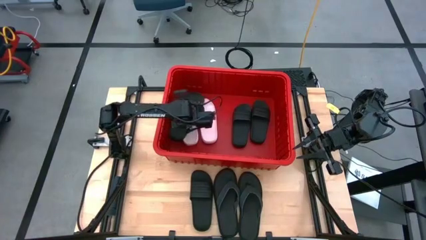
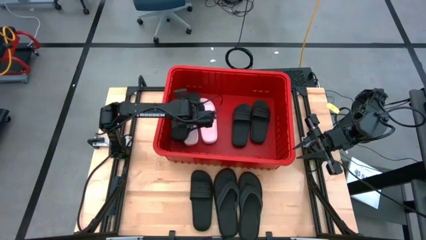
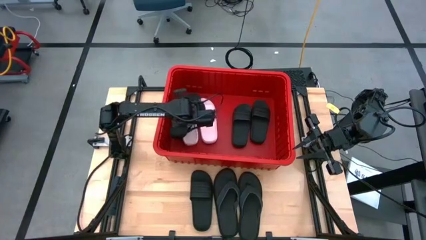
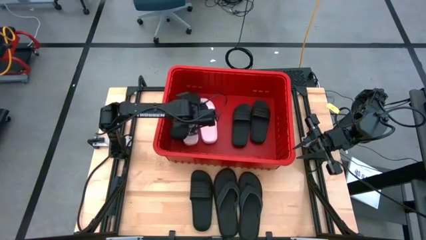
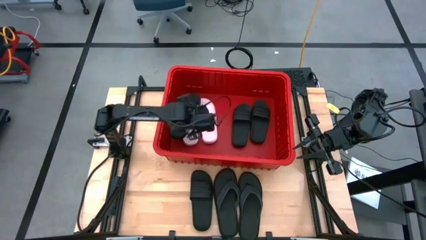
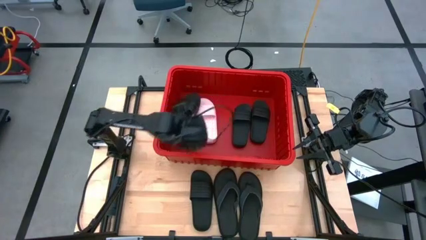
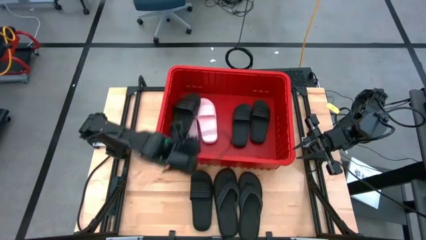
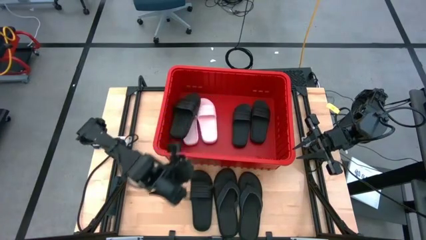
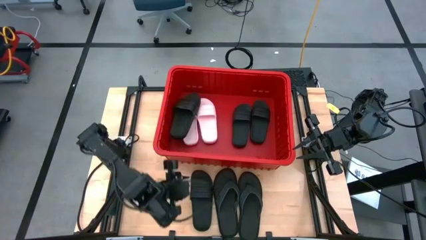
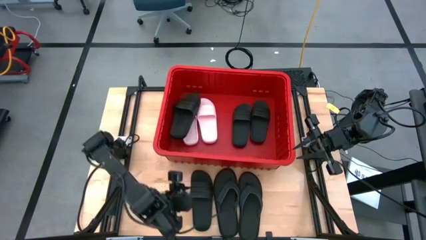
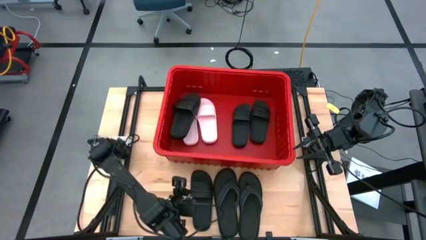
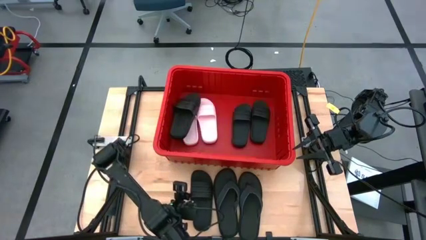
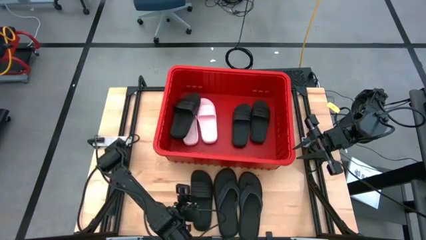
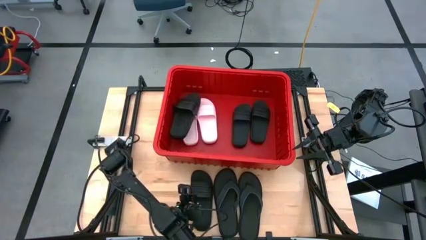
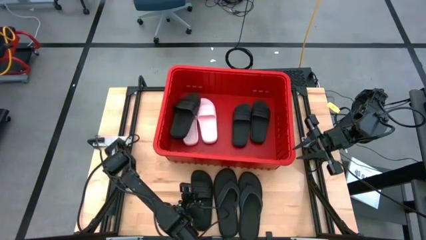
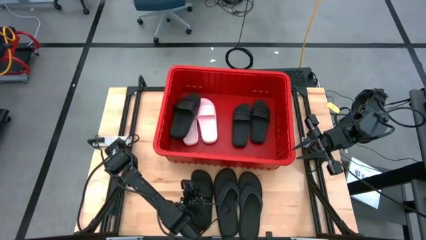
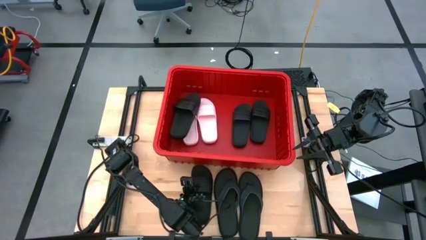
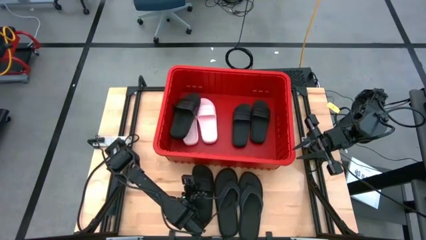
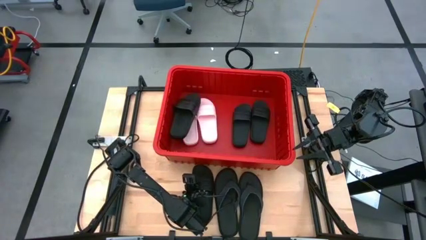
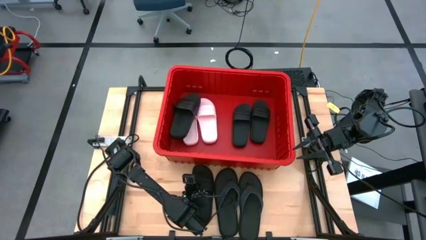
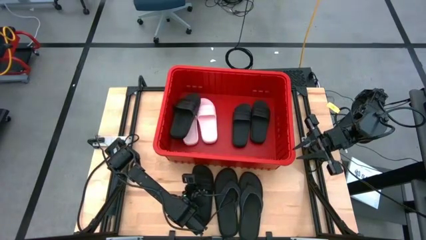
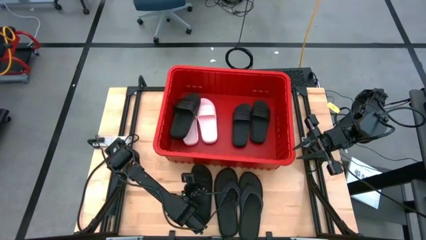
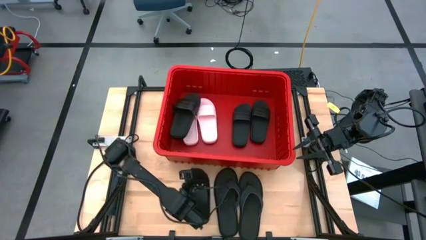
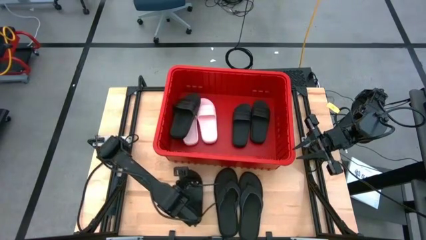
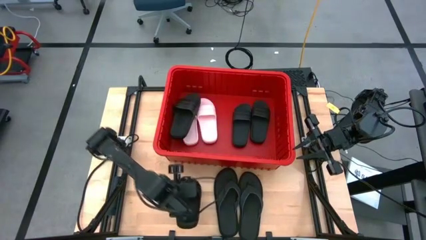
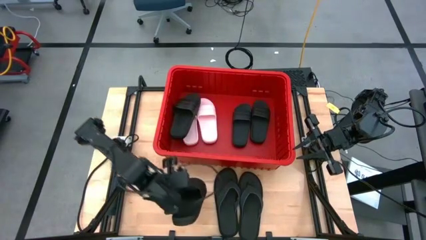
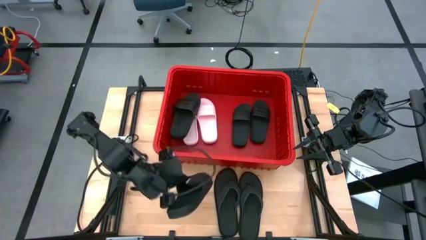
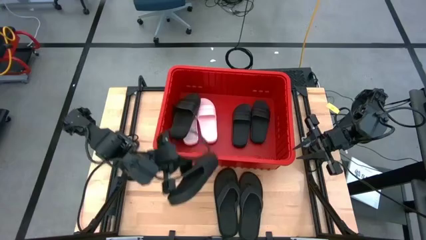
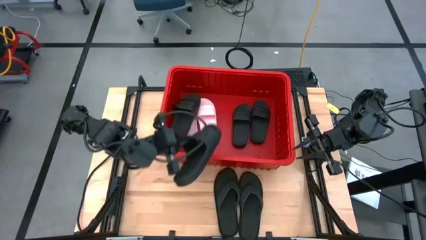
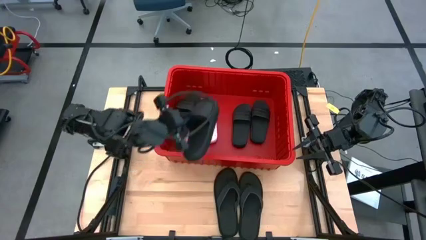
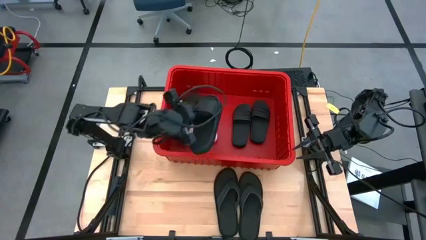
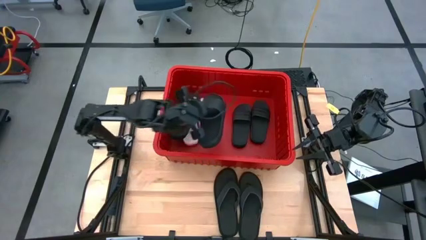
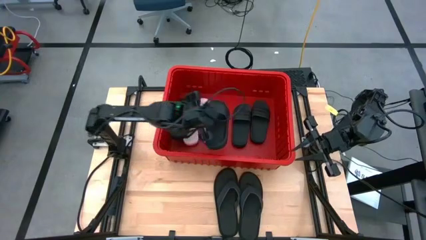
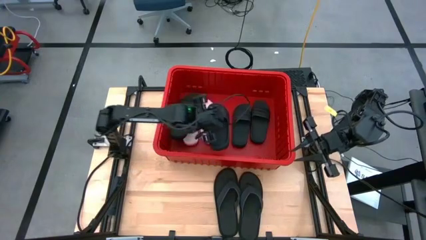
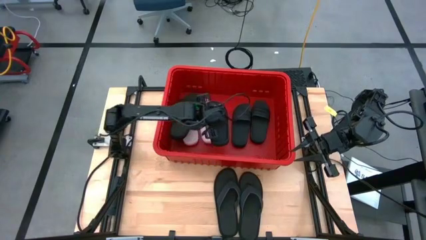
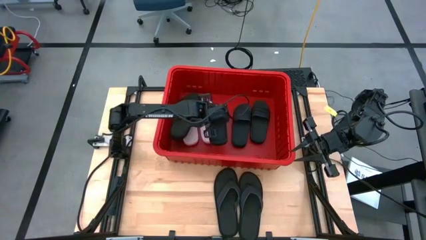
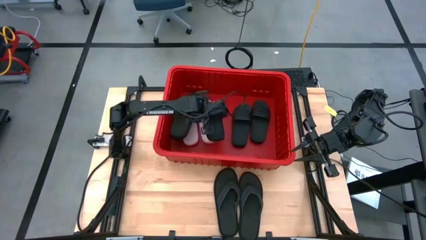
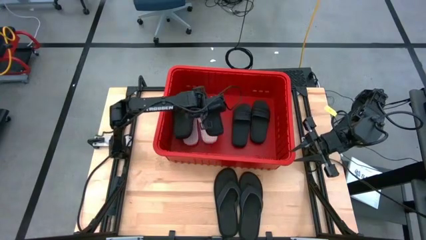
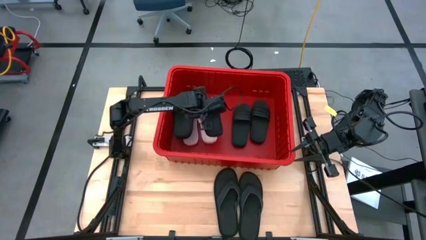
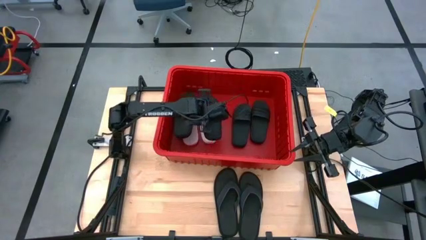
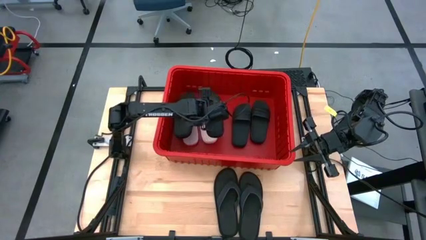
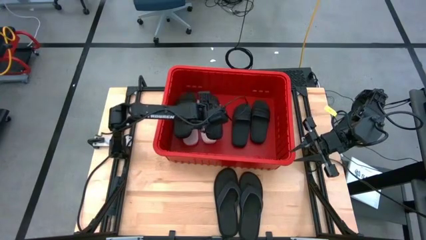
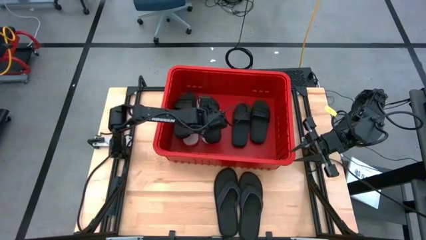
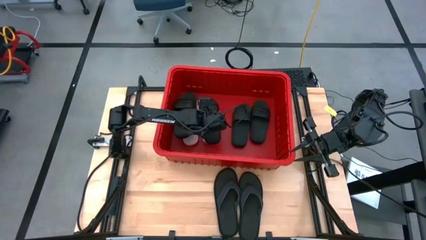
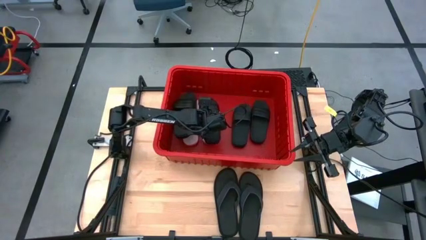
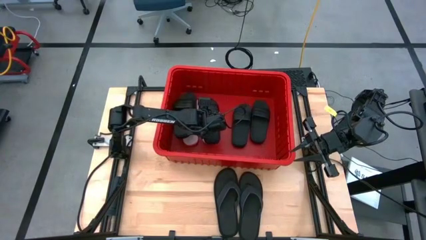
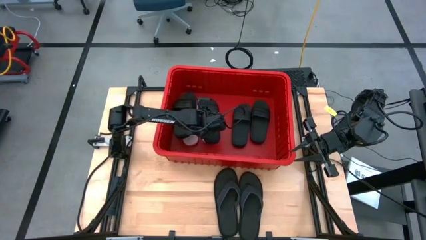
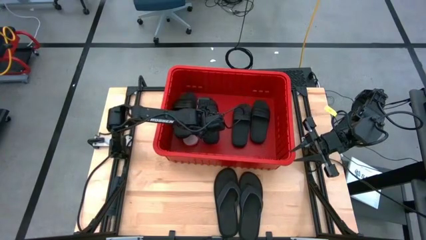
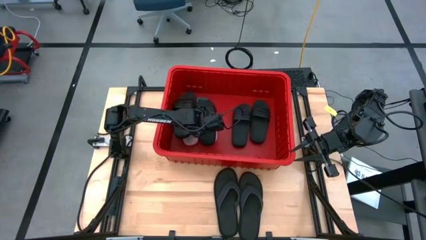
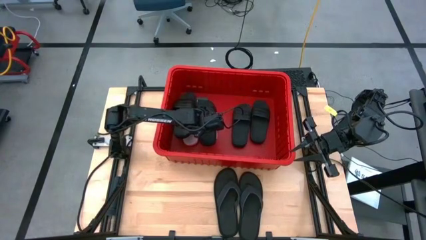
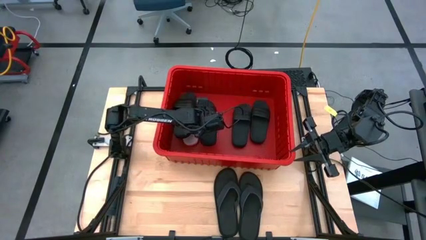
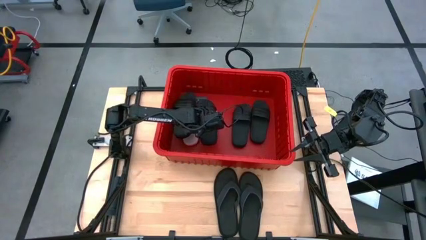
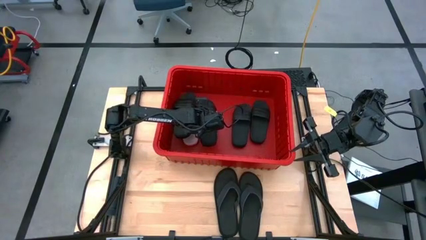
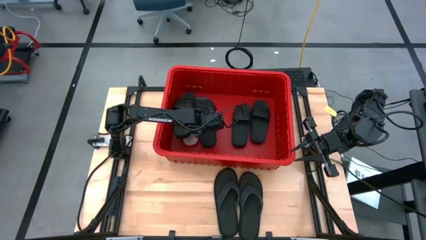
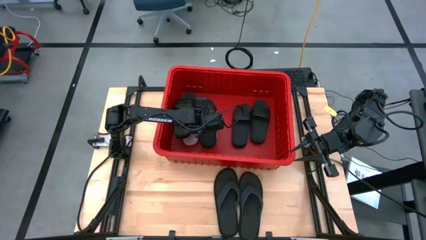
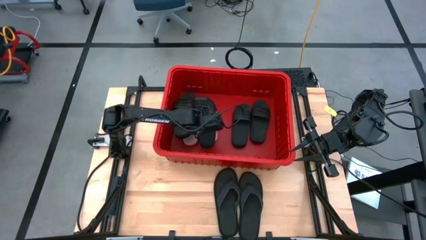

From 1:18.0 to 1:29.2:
Task: Pick and place slides into bin
Put the black slide into the bin

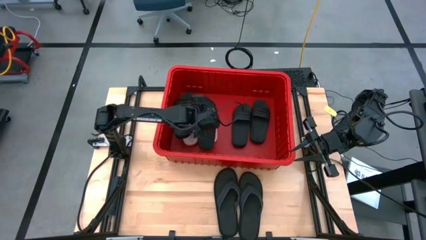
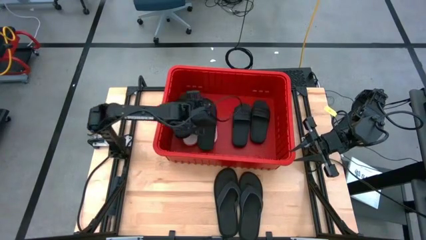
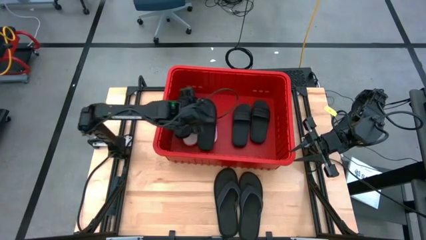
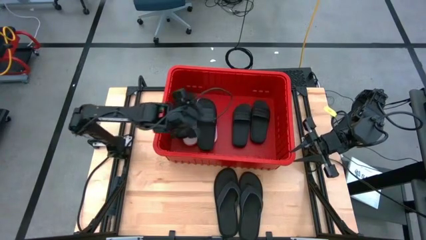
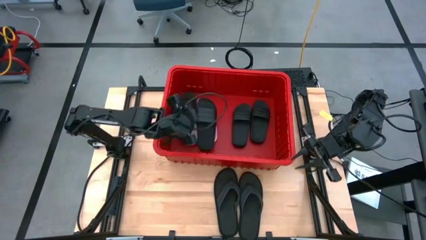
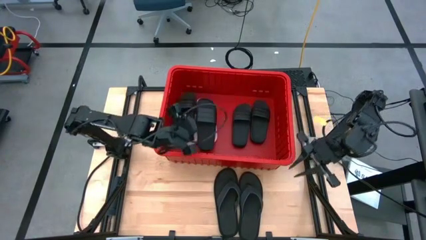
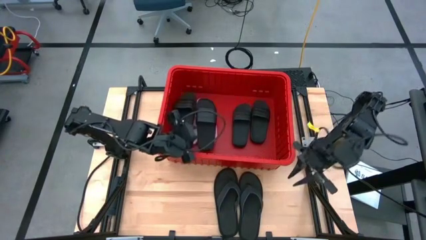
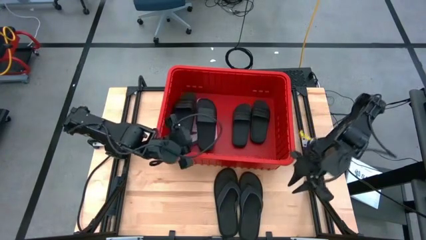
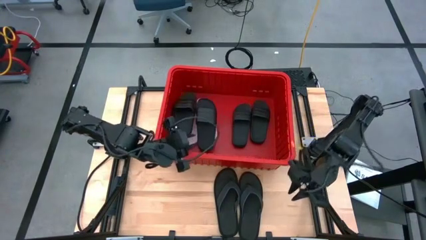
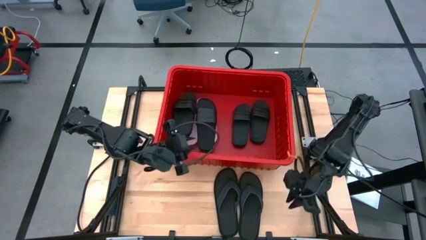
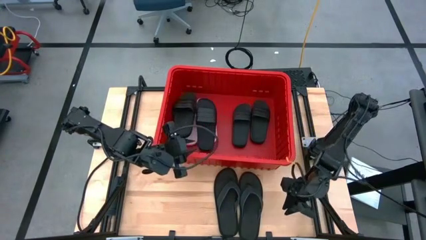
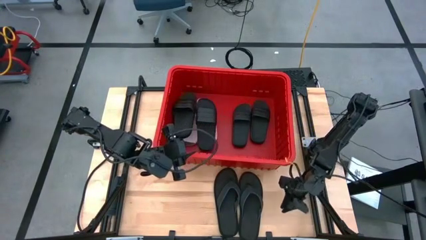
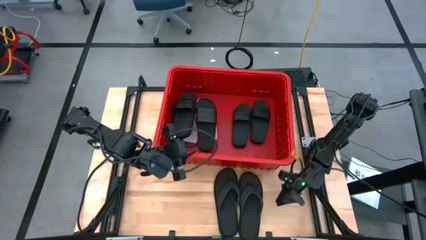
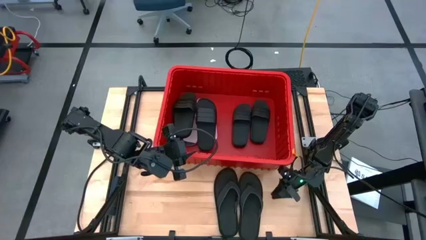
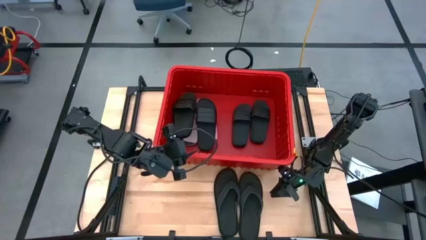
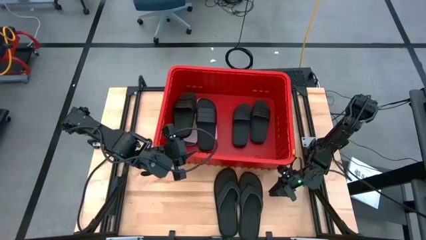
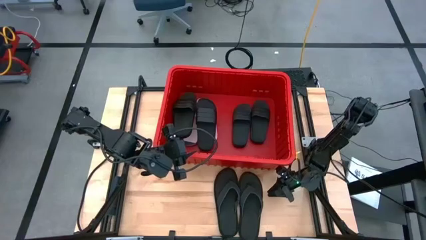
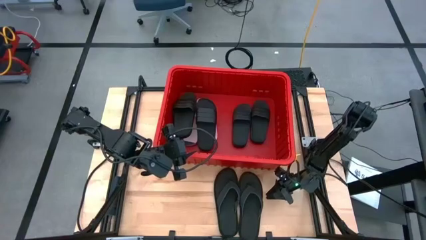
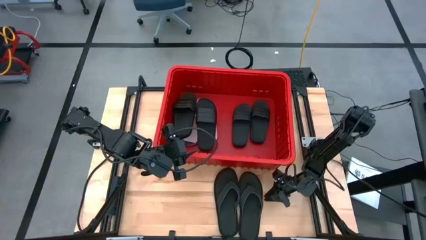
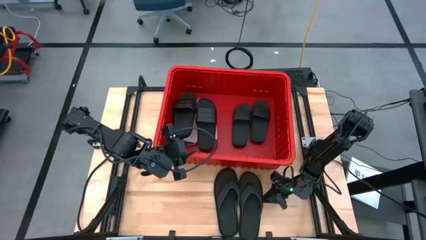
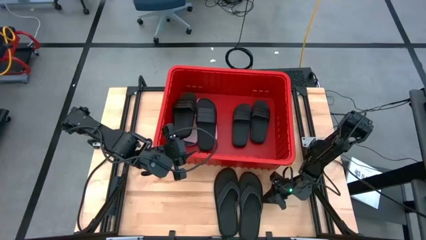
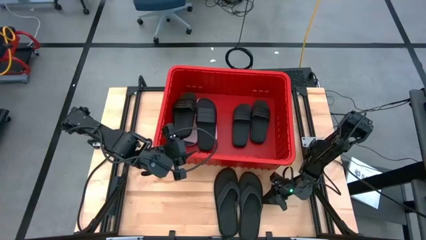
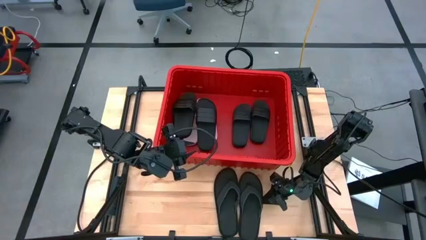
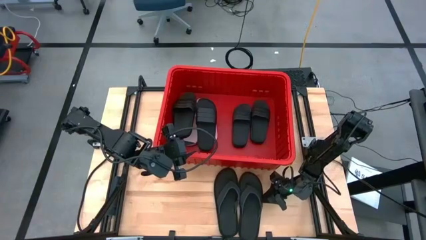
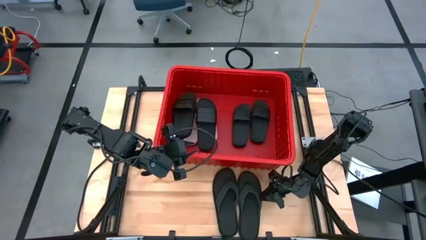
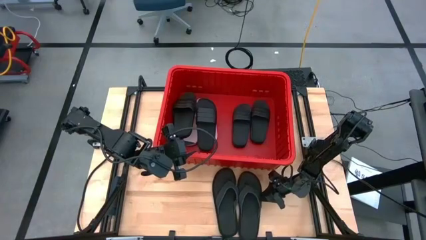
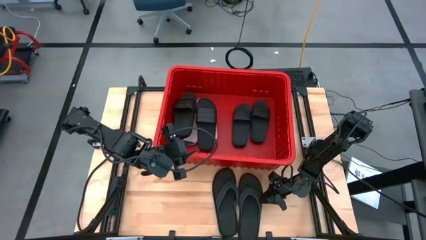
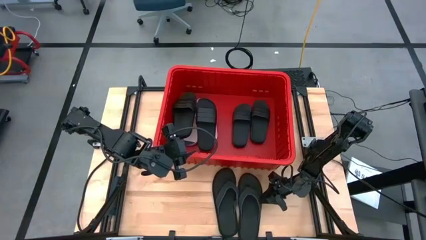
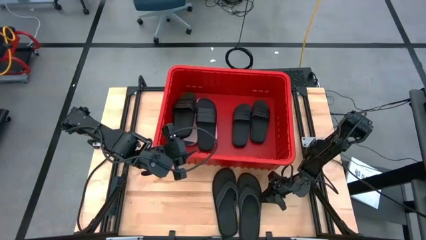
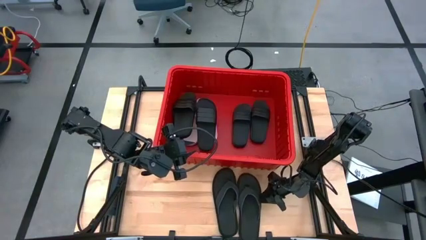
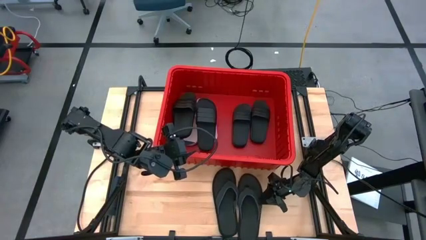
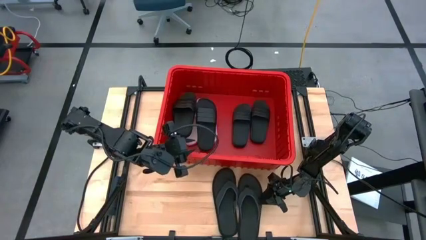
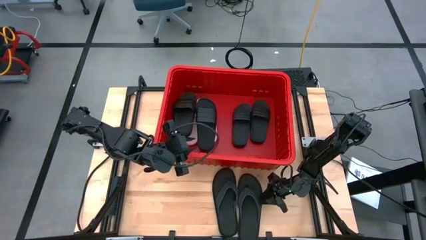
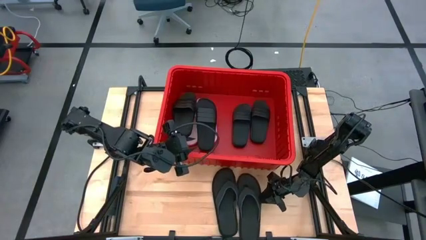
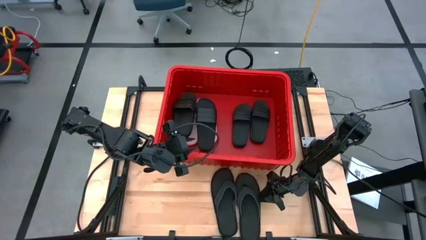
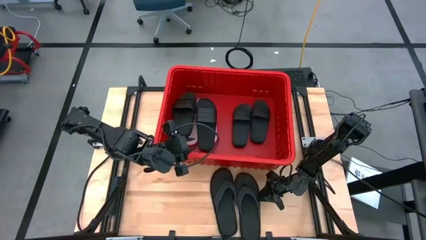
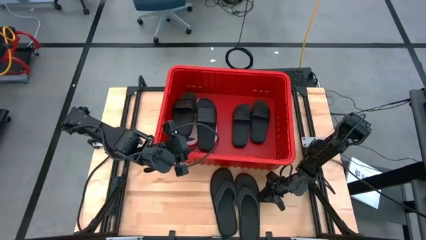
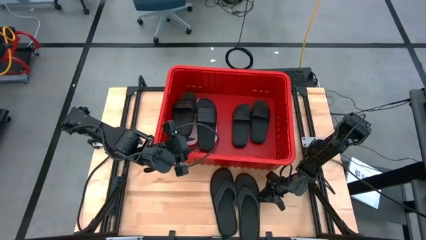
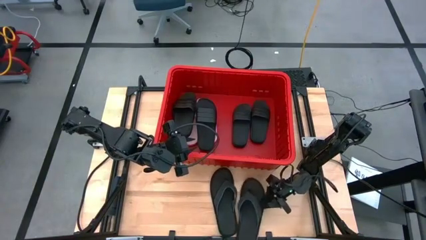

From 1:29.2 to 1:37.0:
Put the right slipper into the bin
